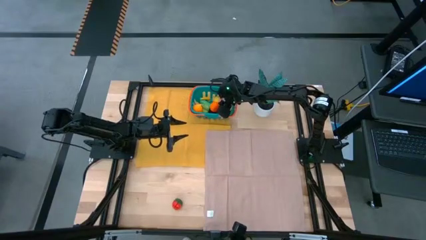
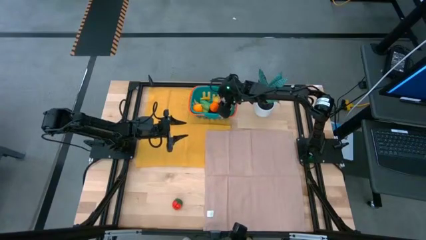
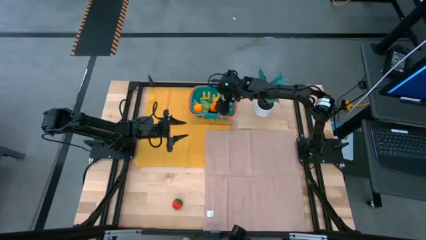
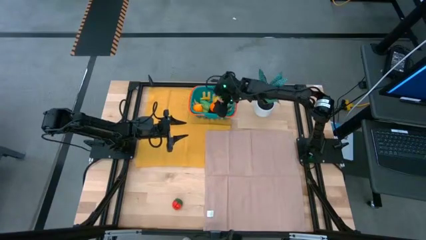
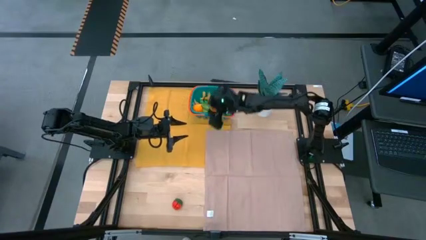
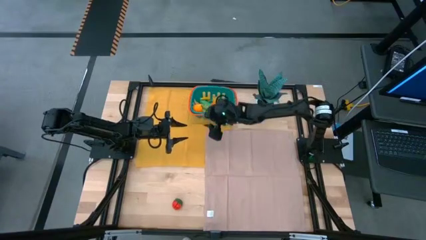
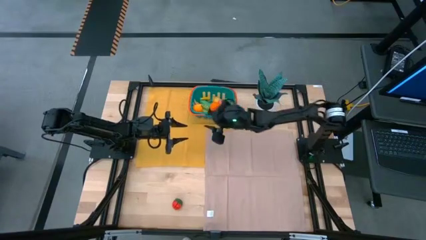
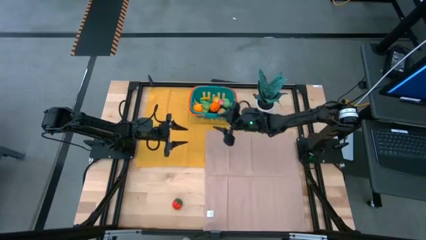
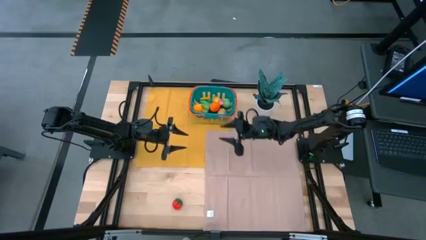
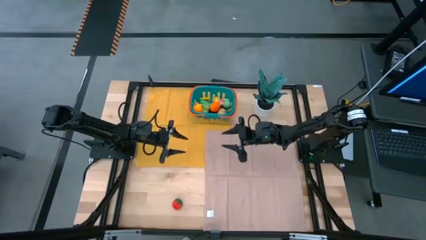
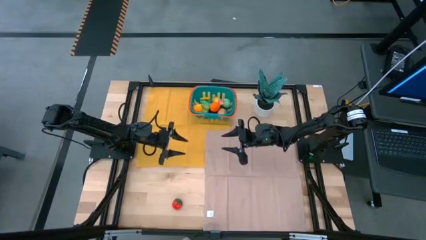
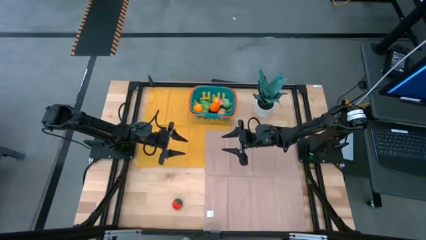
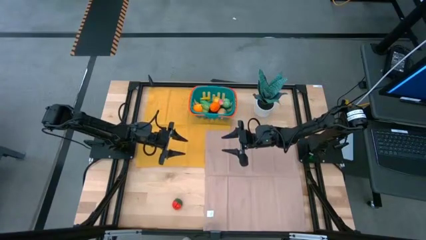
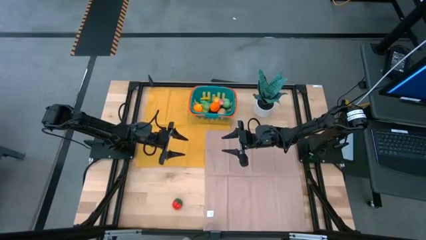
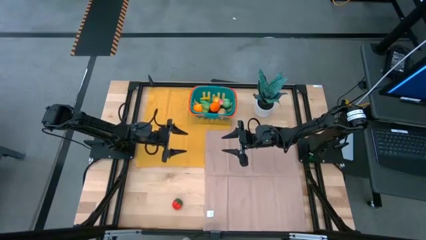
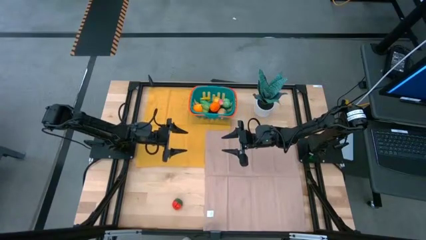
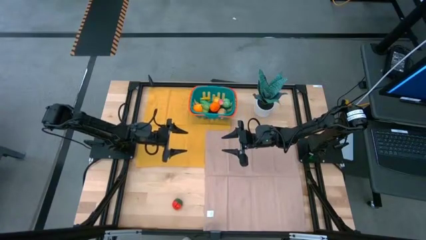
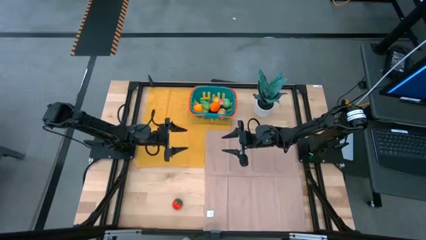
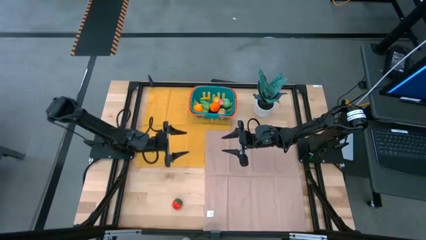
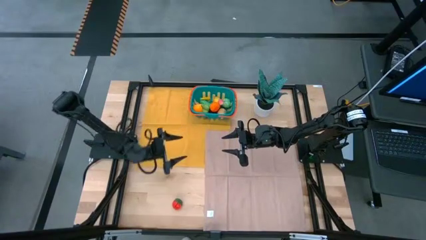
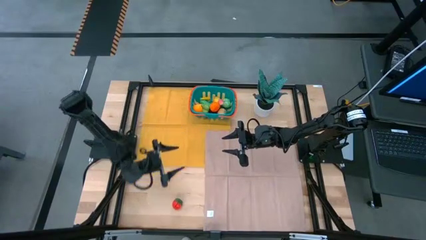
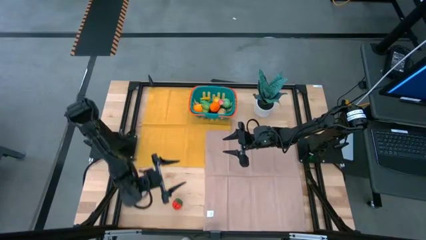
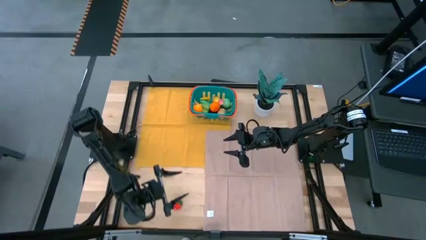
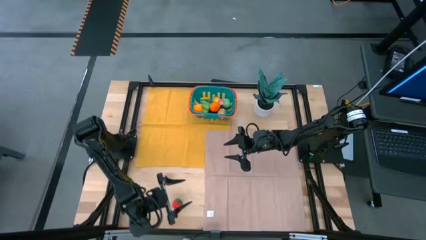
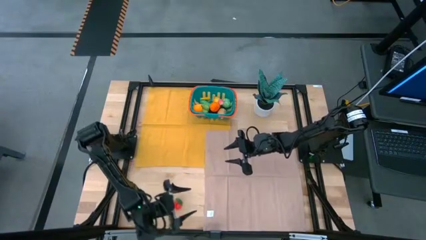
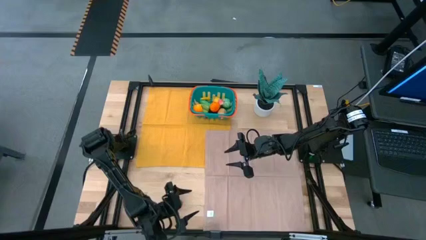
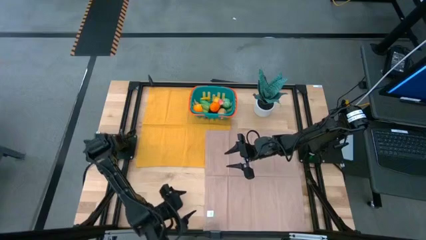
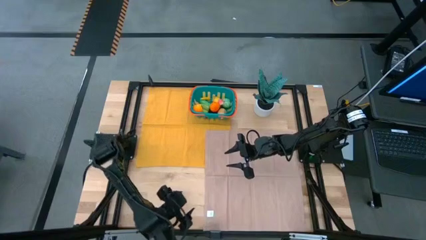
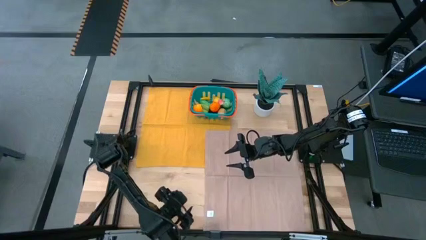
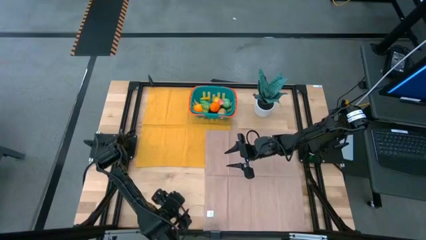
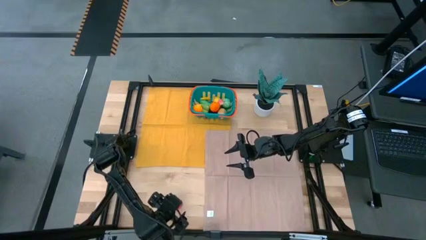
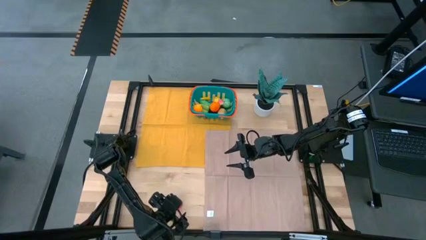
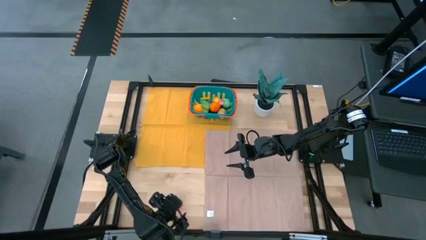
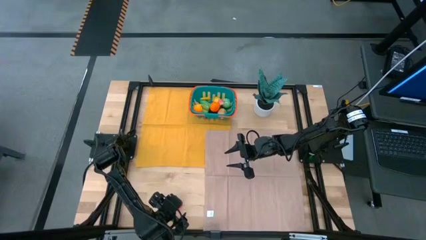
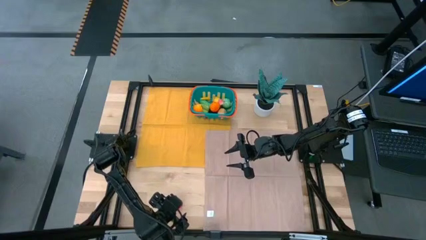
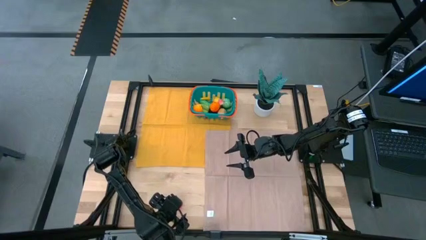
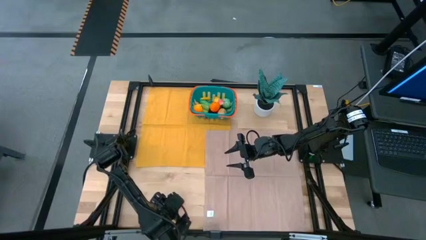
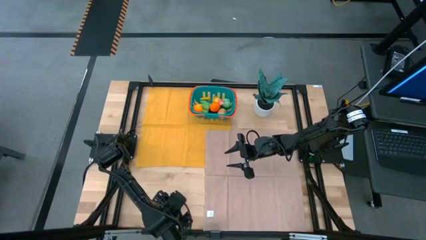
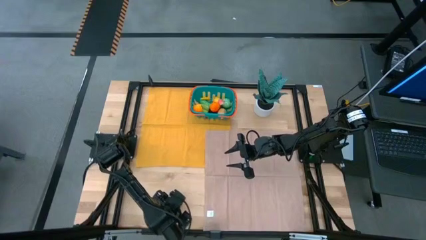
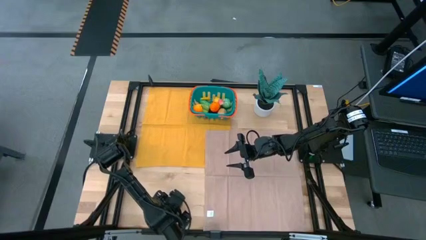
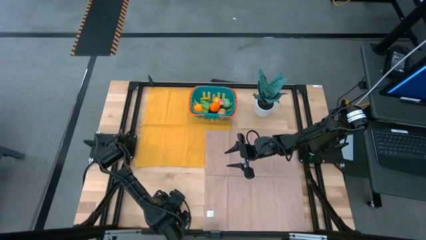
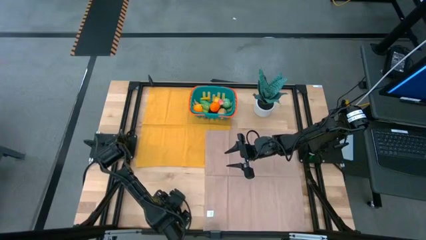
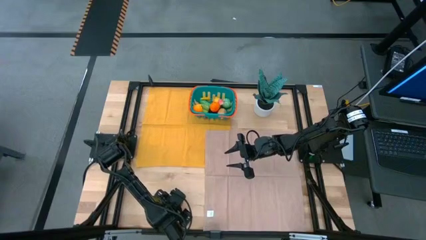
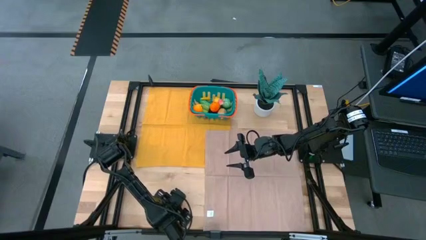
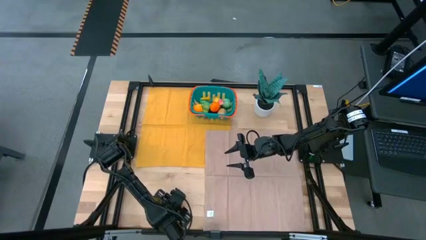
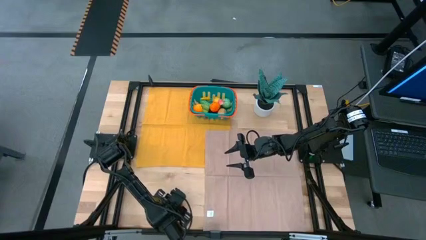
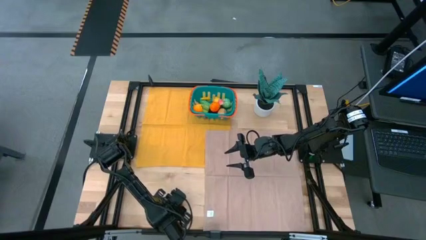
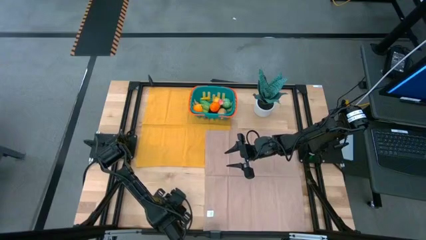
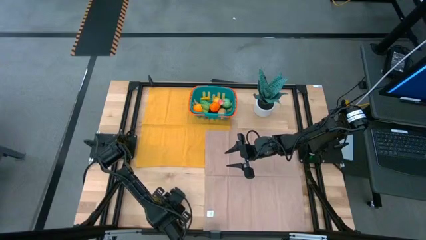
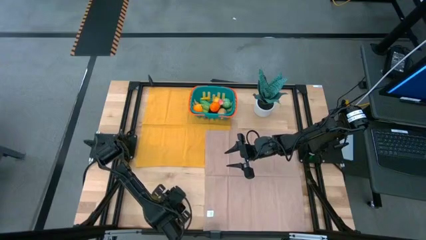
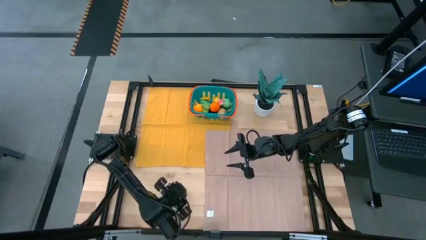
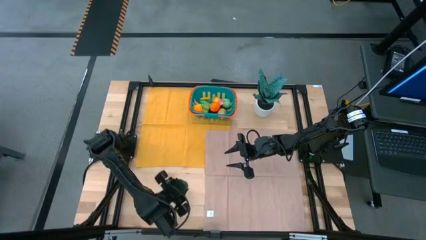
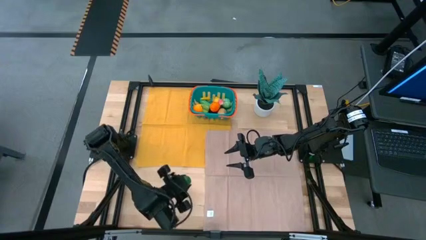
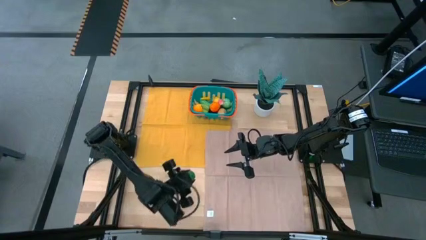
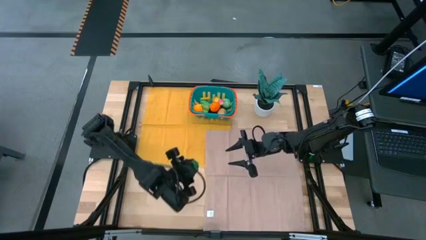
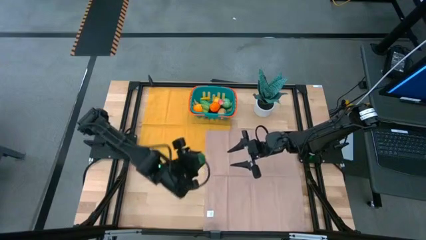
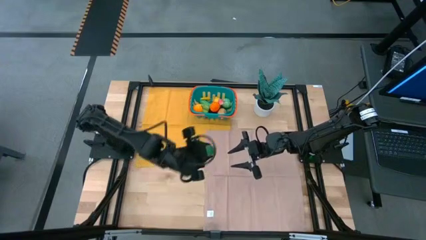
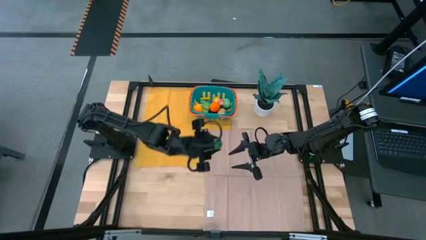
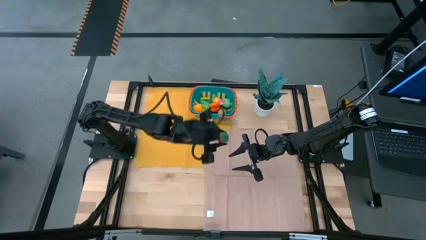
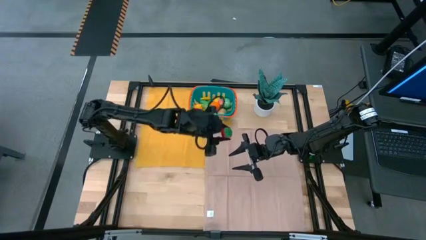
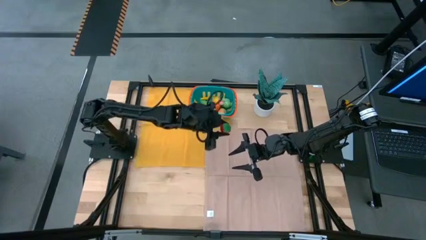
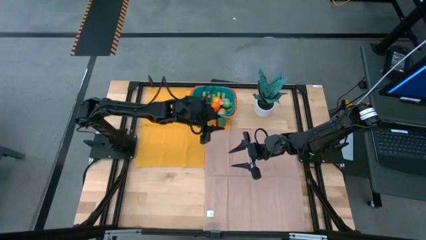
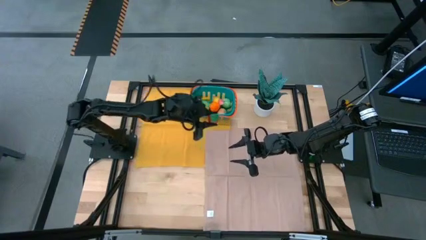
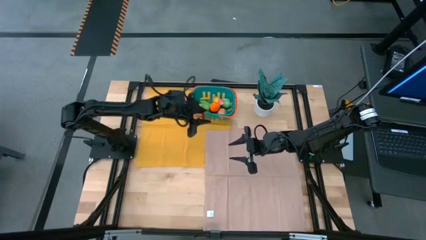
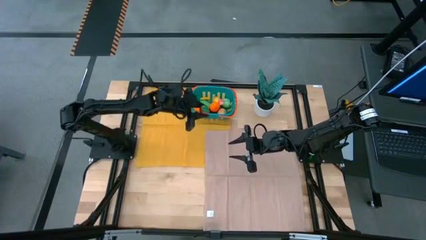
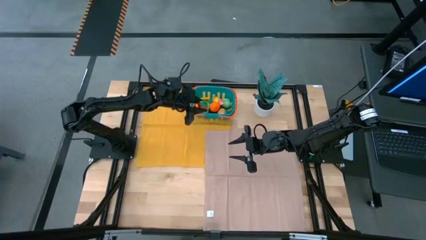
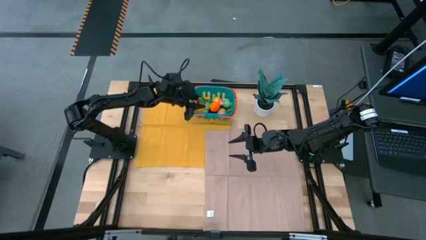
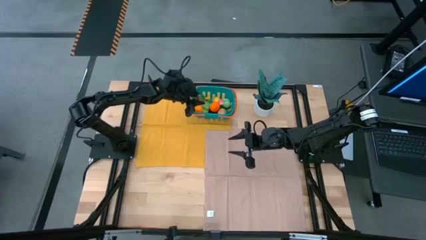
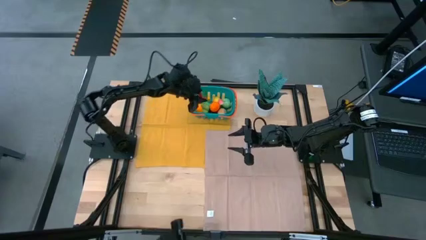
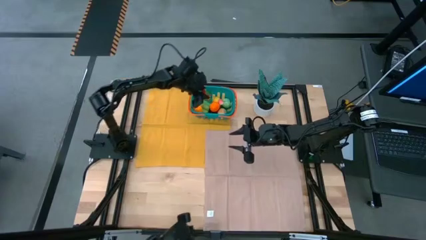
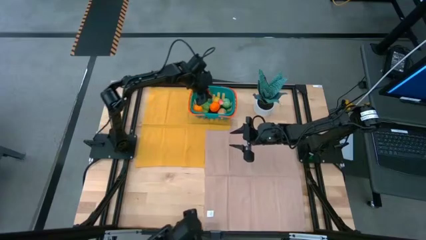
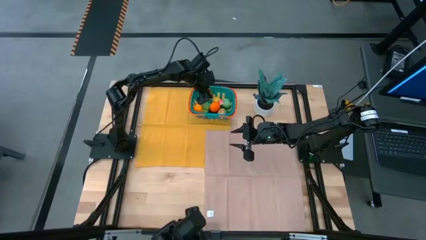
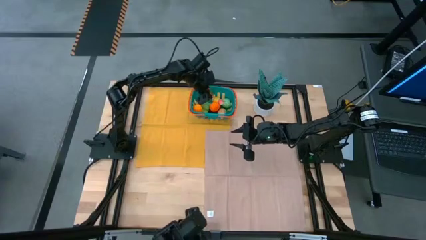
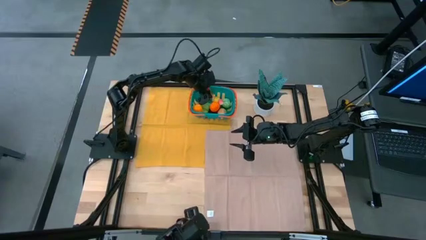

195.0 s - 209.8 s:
Task: Pick and placing Produce into tupperware
Put the red strawberry into the blue basket

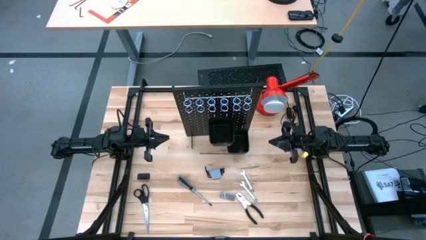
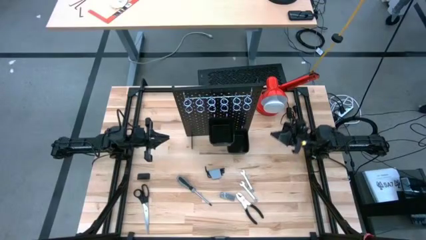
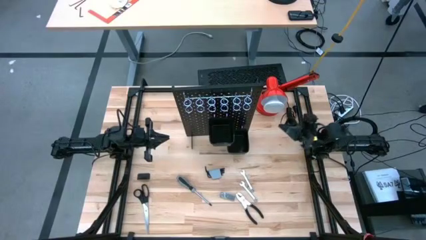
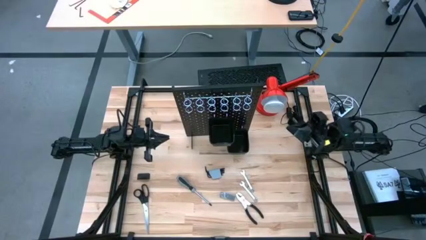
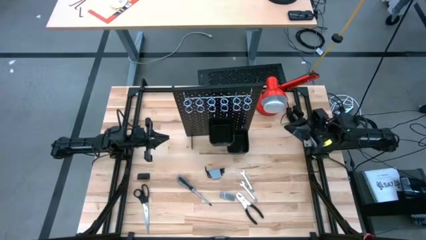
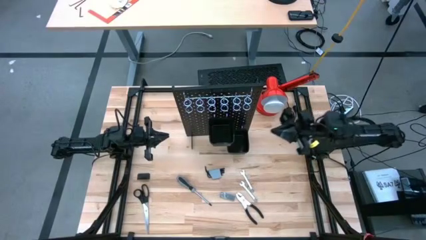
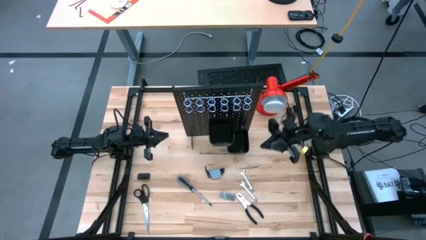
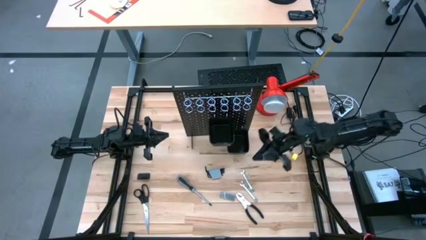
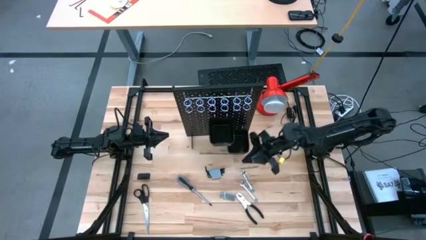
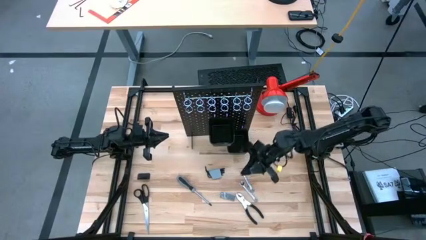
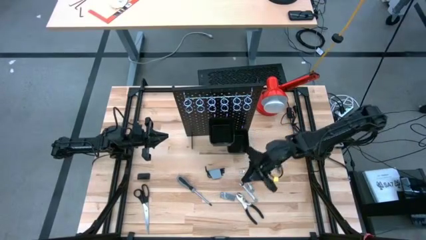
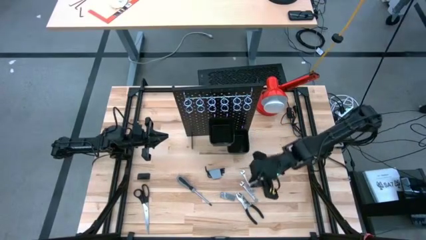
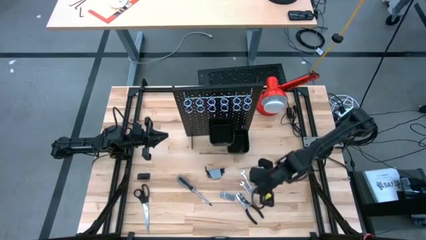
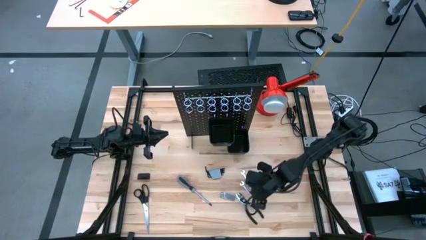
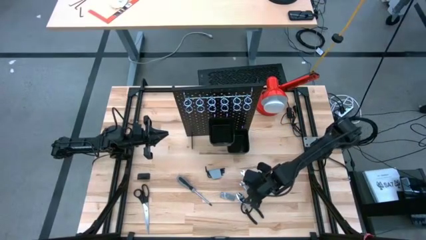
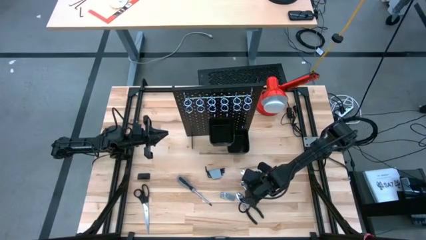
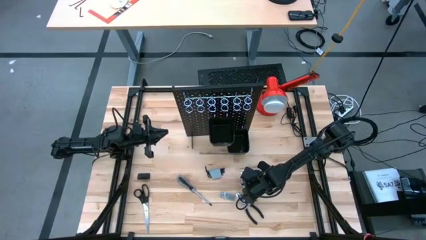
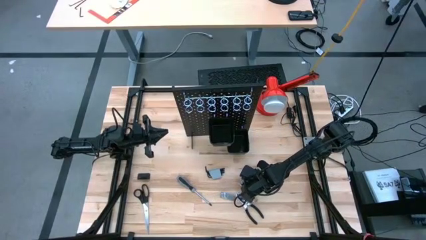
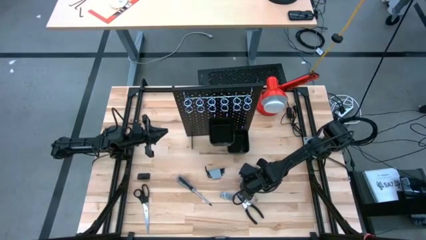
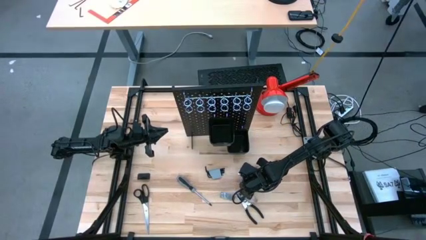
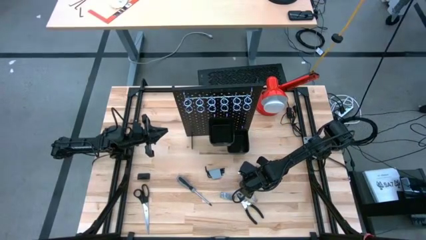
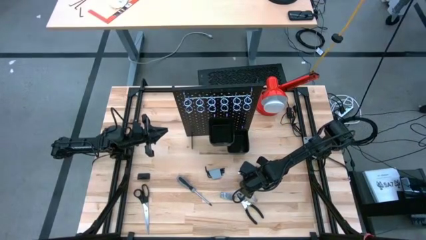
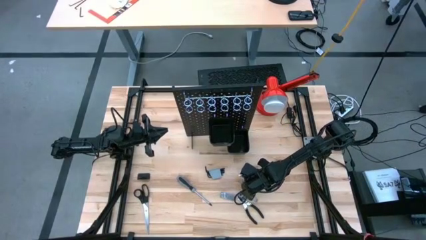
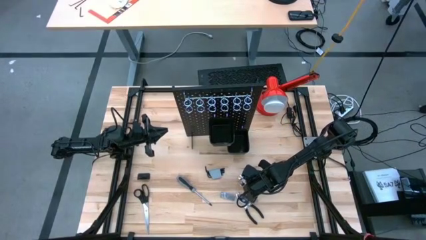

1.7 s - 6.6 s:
Task: Hang tools onto peg board
Hang the wrench on the pegboard
